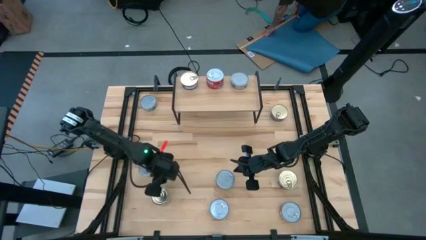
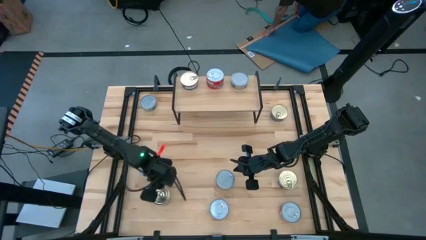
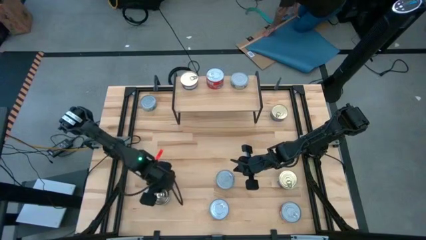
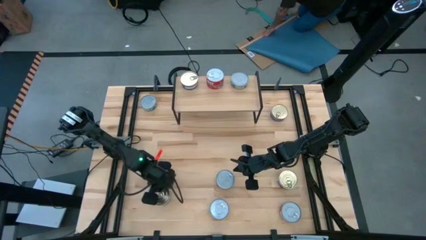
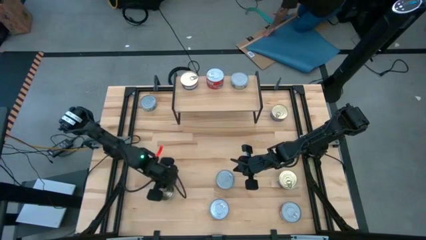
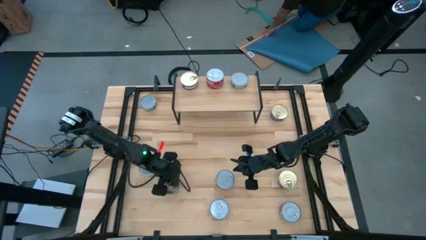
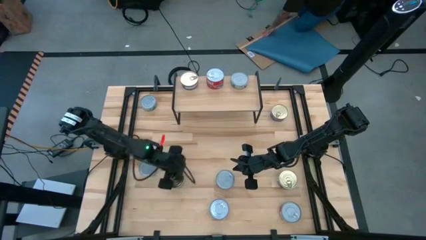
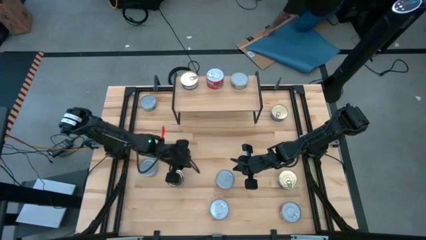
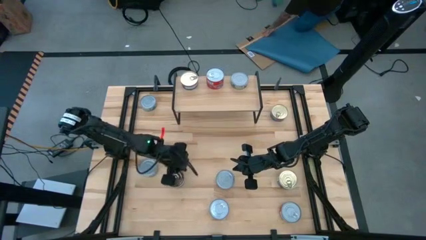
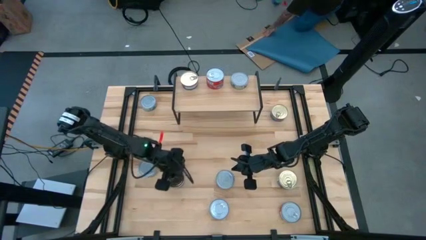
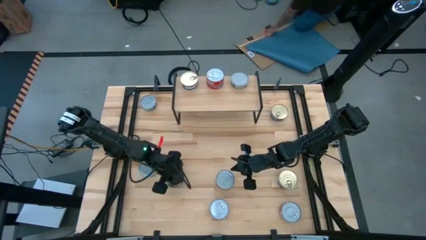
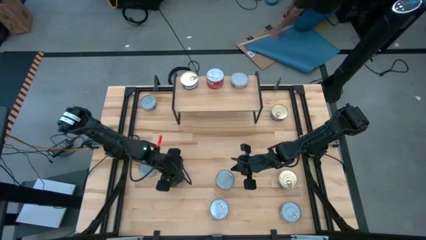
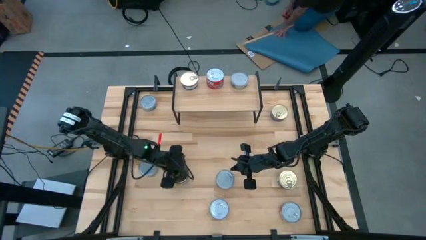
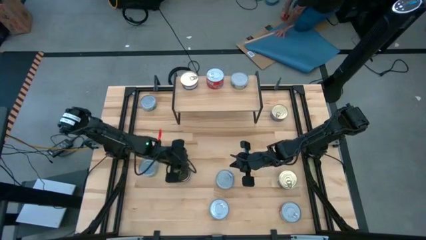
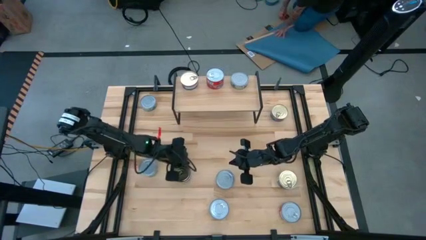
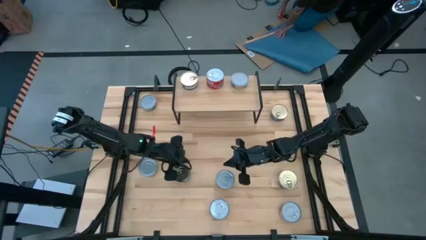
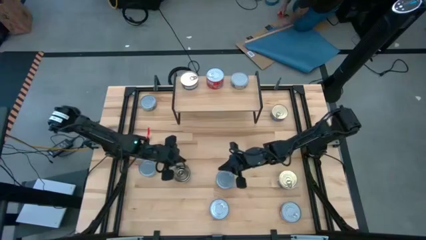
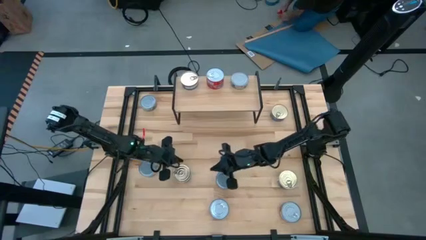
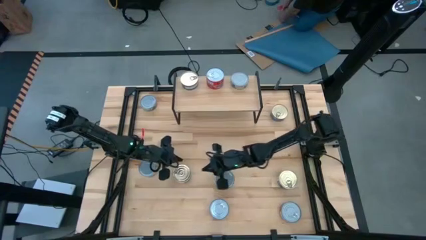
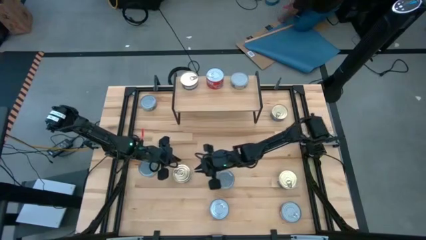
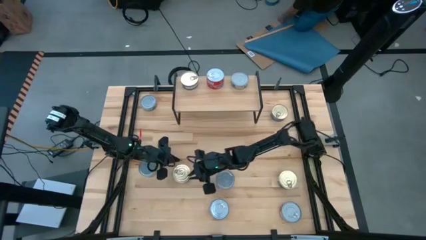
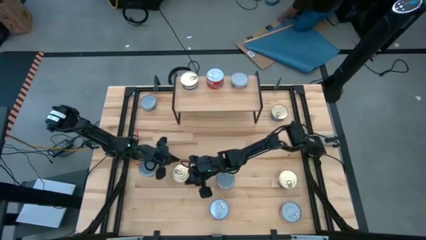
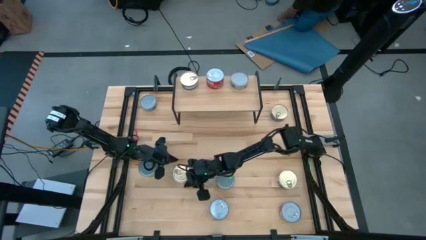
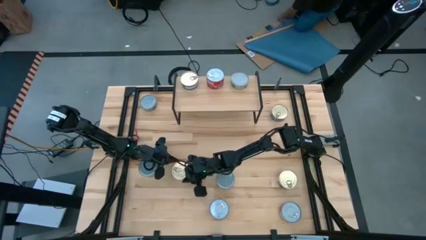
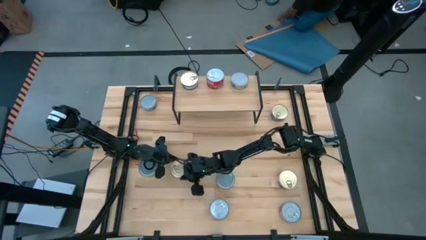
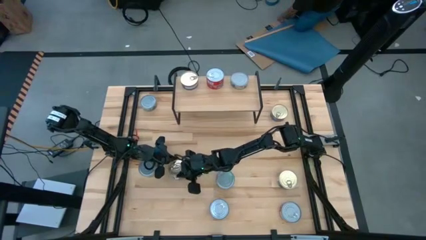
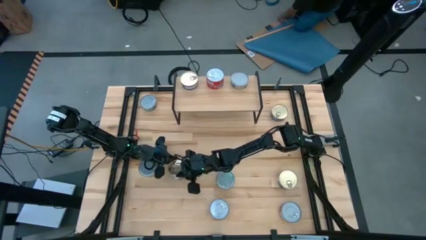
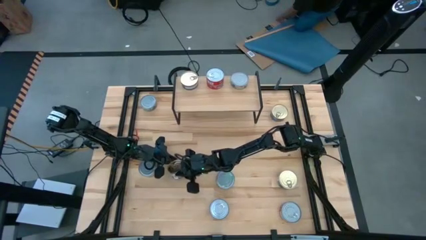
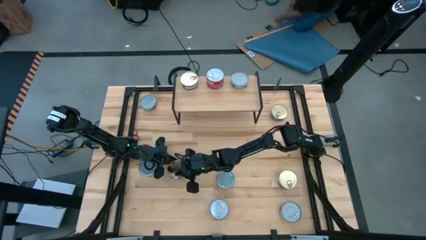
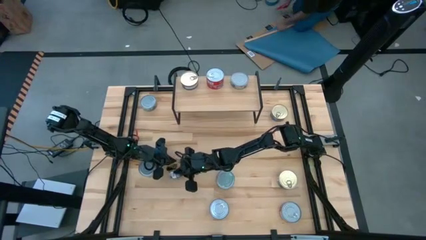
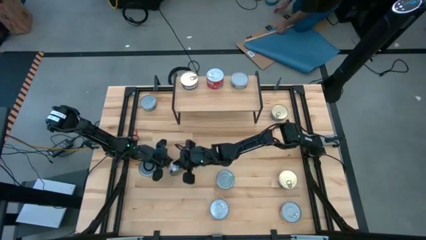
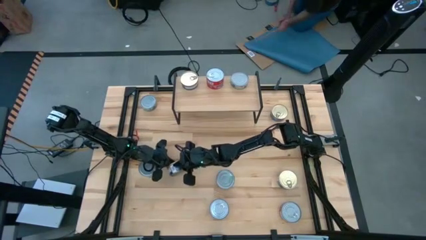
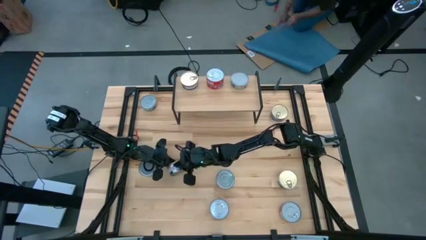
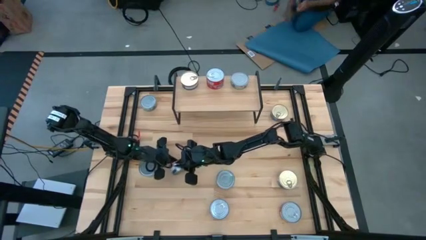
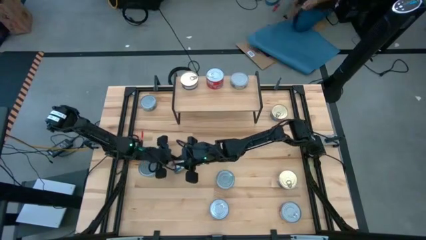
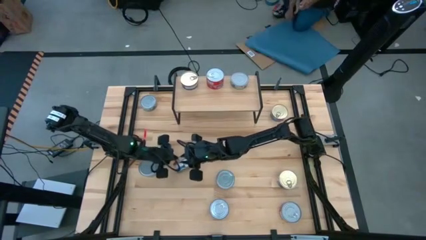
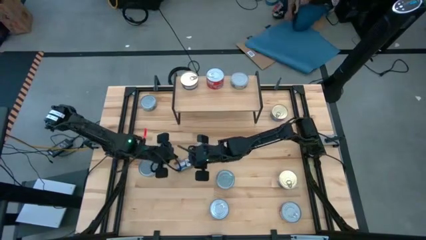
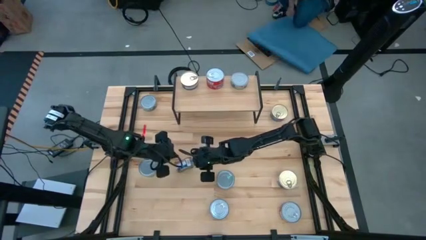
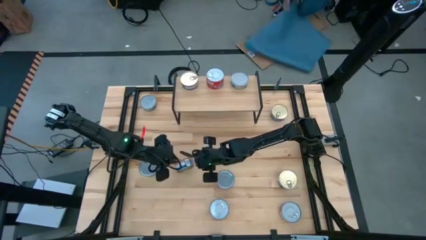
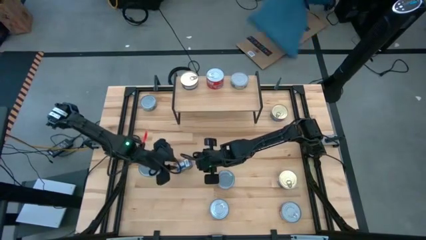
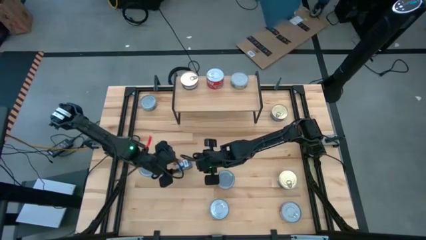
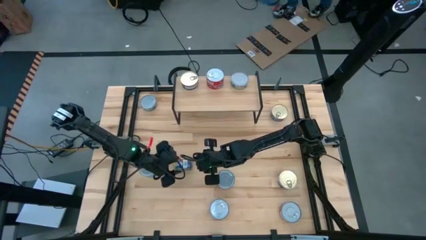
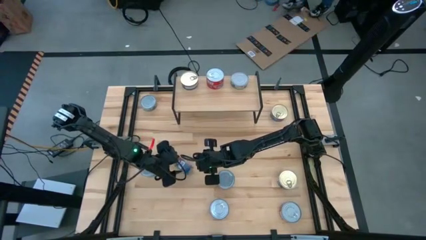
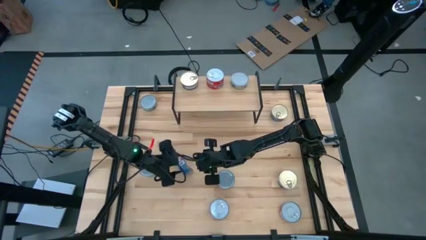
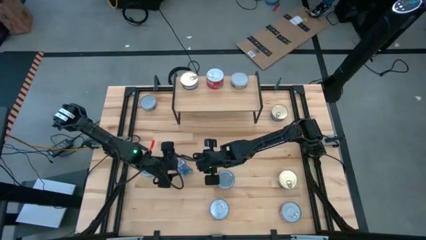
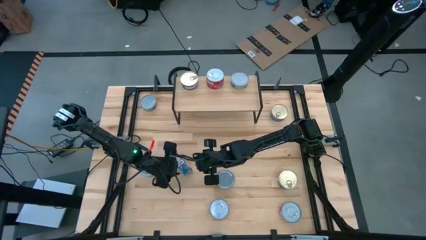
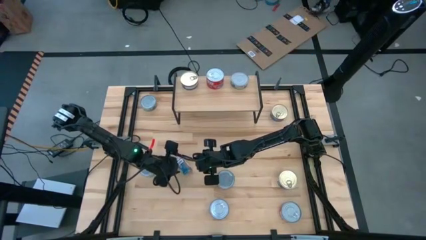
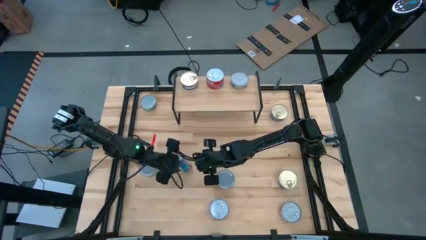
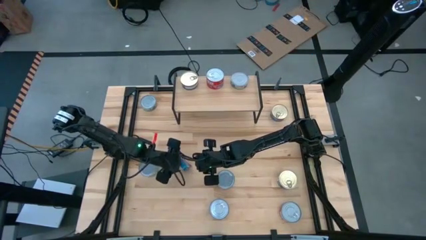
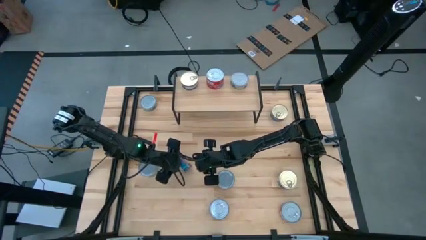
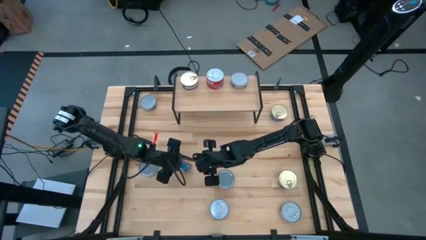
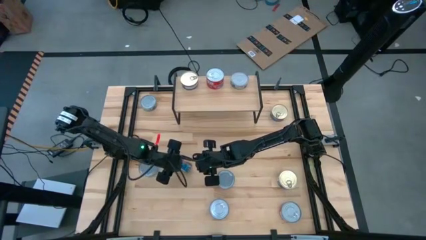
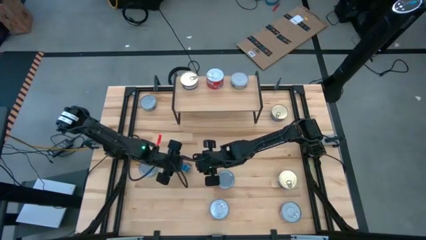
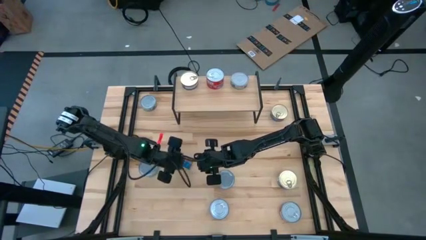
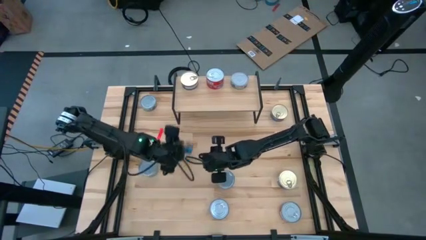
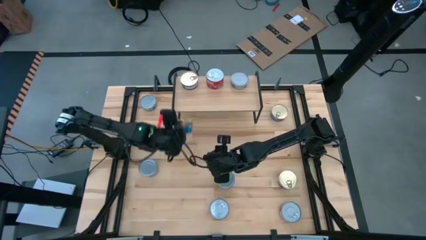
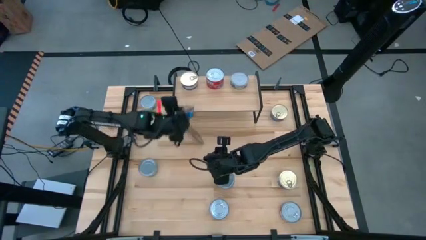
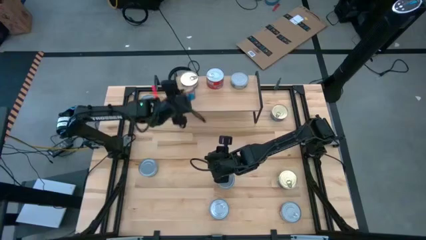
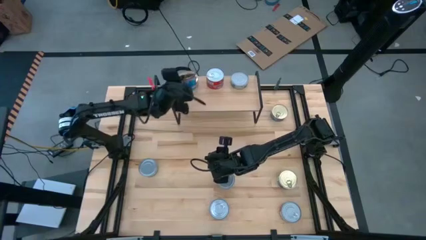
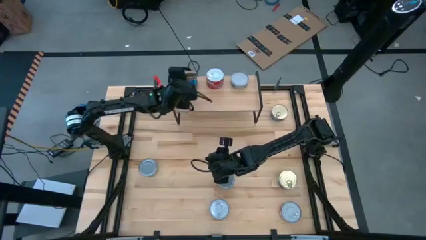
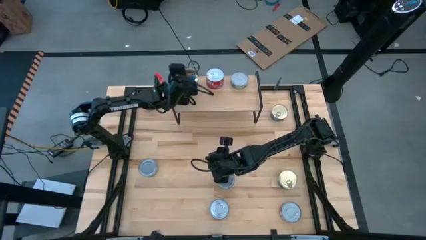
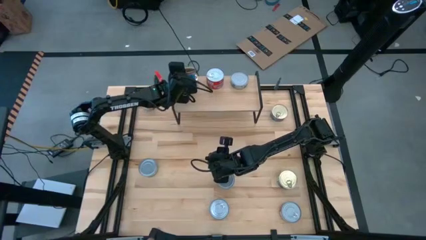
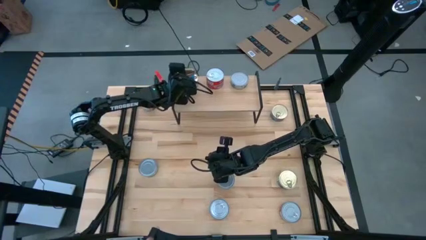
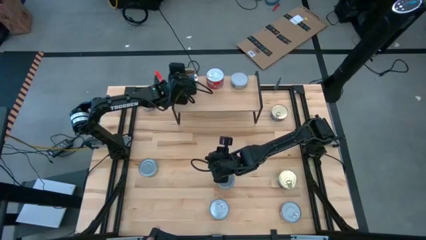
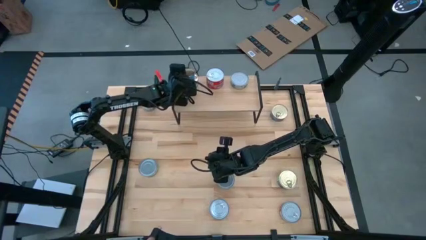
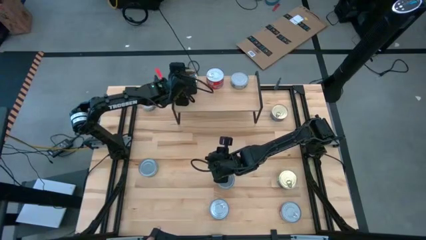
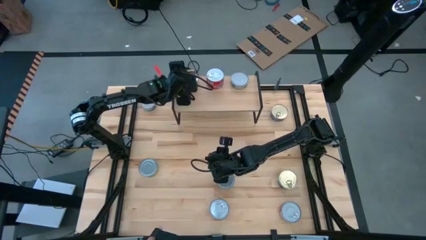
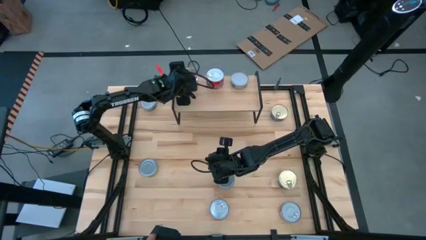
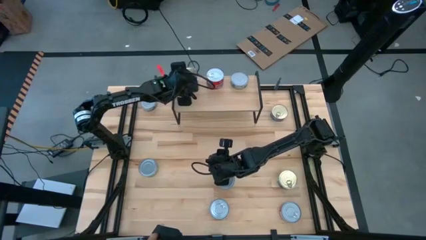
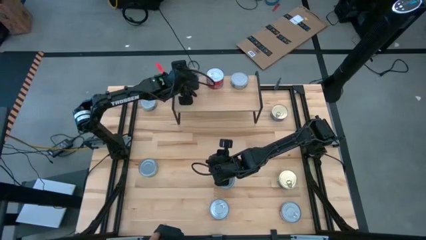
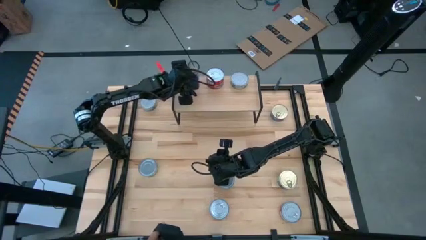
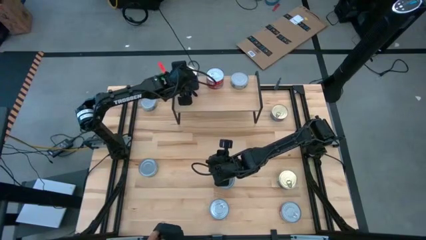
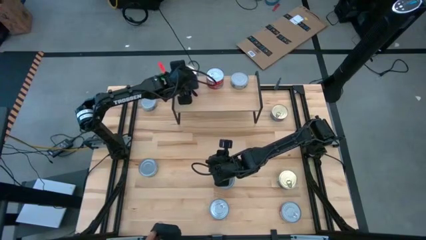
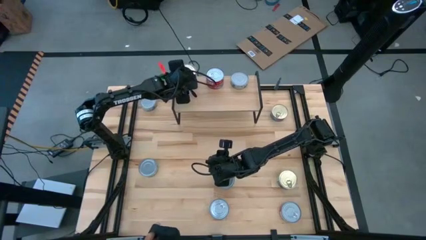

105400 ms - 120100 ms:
Task: Stack canned seafood by type on shelf
Stack the blue pink tuna can on top of the other blue pink tuna can on the shelf

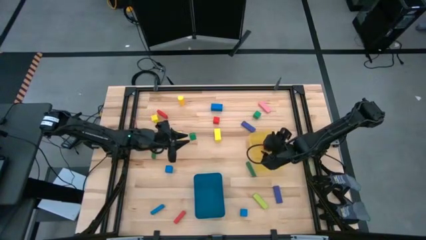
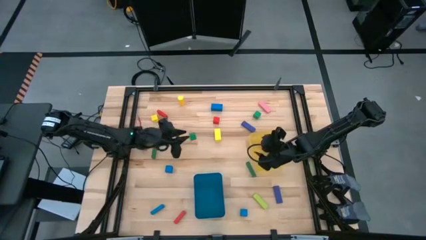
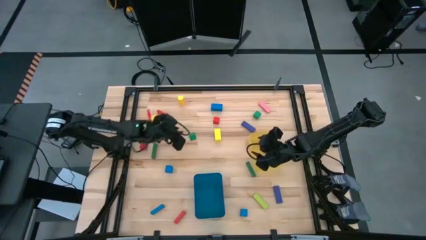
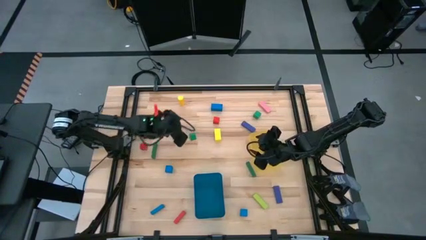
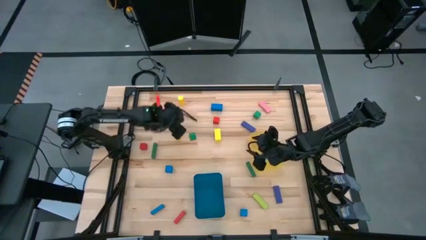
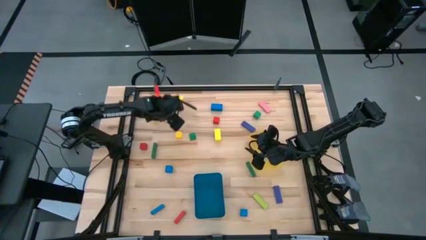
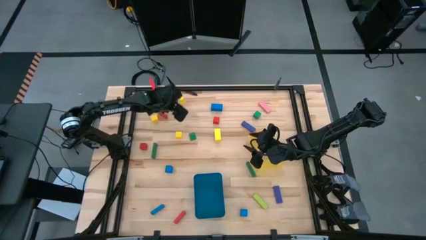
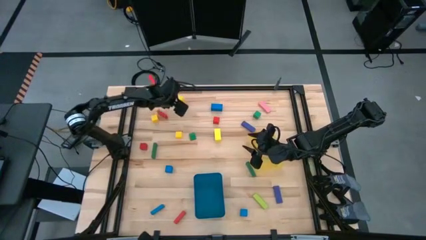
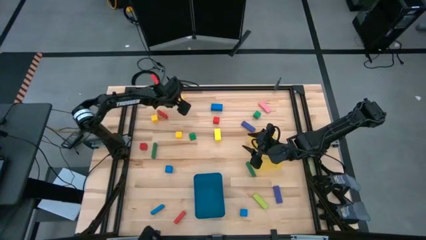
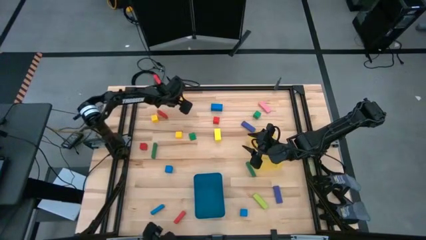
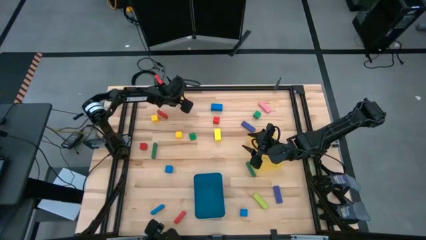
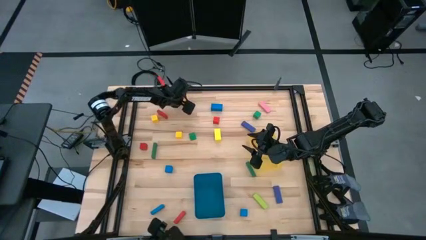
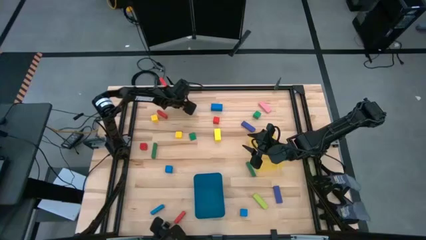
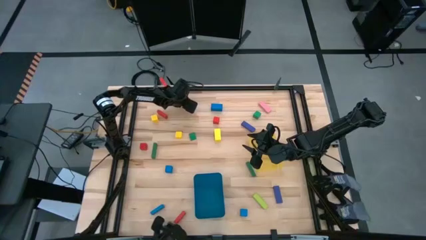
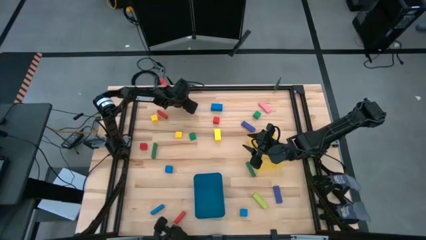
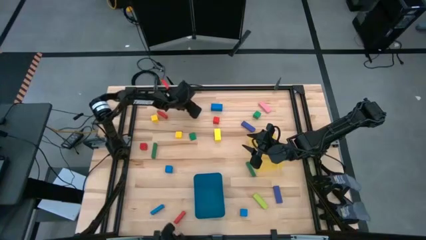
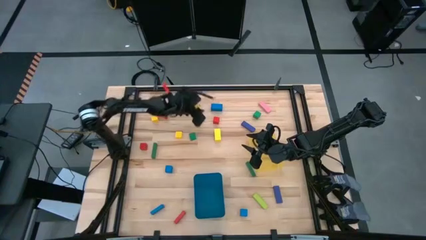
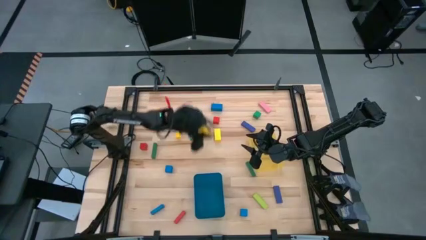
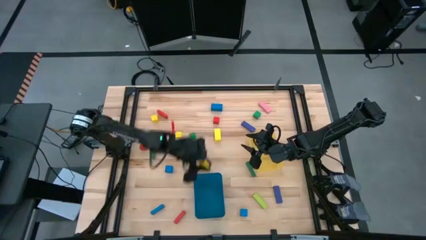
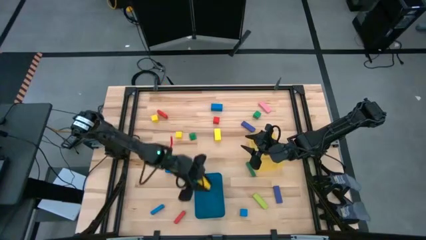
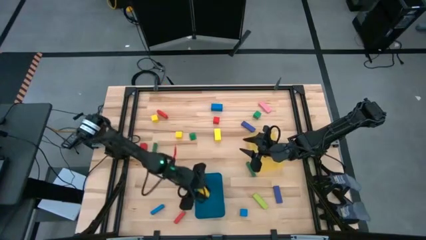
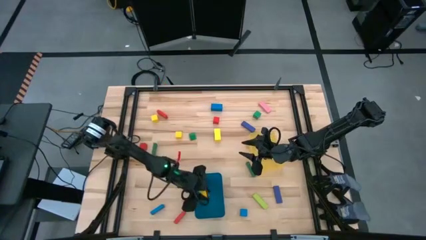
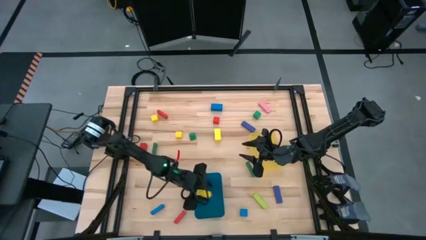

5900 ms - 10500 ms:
Task: Sort blocks by size
Put the large yellow block into the blue bin
